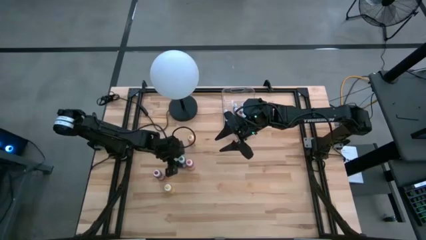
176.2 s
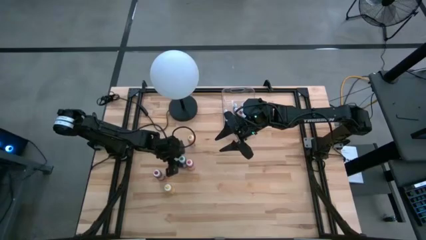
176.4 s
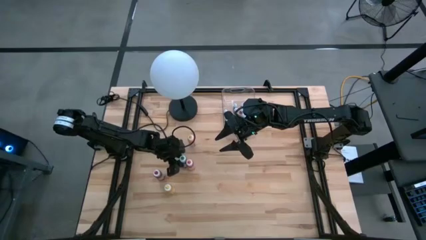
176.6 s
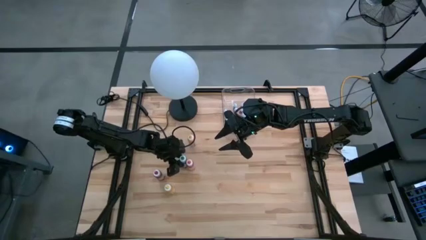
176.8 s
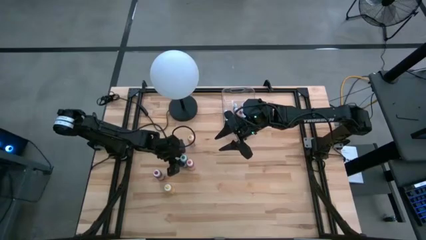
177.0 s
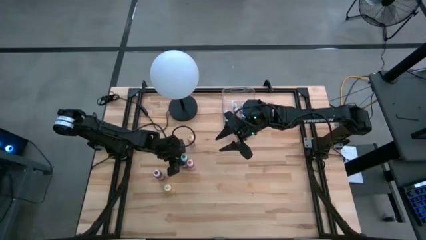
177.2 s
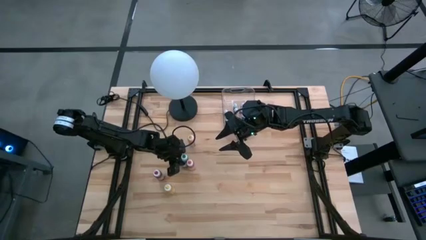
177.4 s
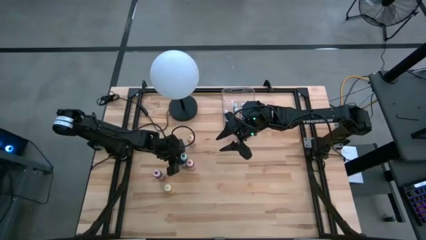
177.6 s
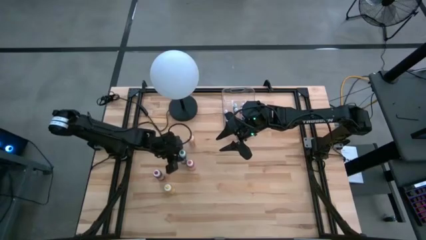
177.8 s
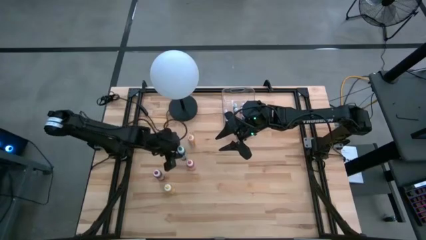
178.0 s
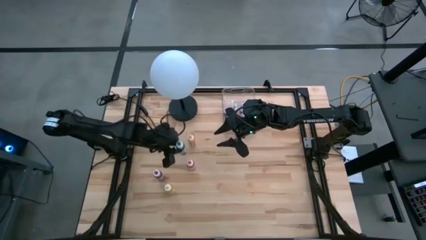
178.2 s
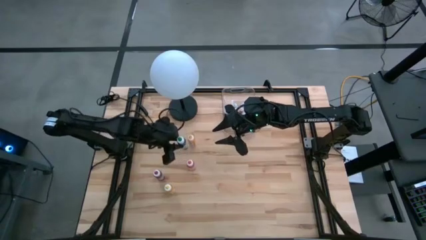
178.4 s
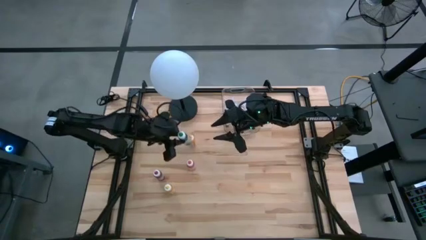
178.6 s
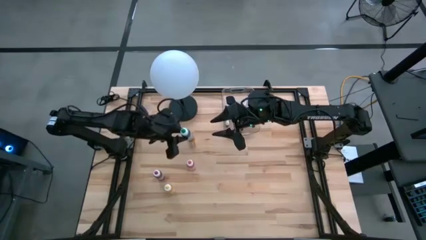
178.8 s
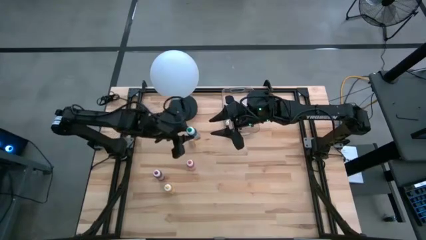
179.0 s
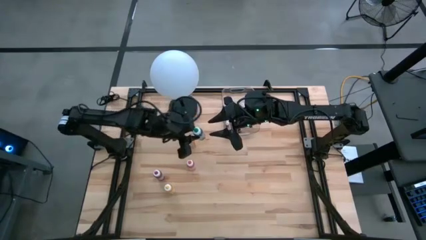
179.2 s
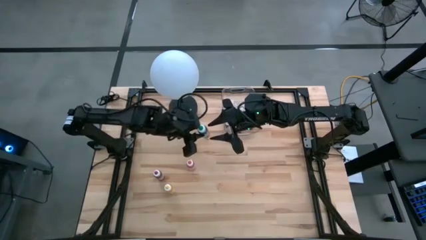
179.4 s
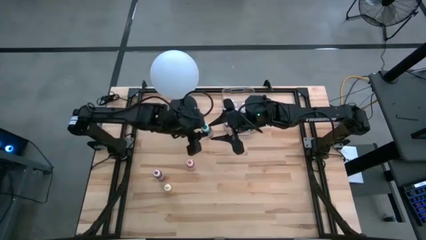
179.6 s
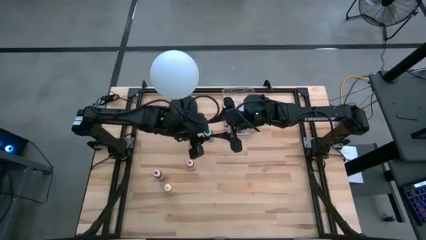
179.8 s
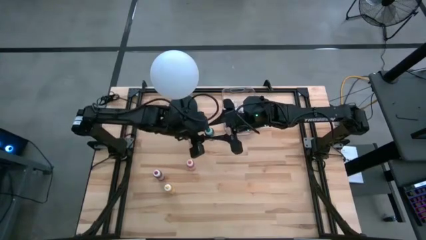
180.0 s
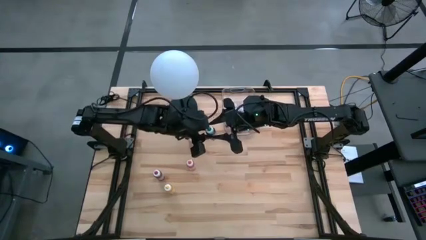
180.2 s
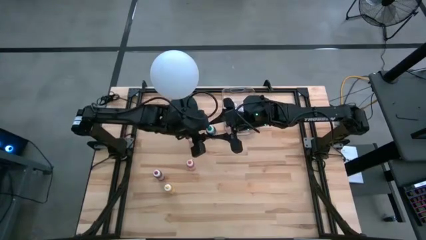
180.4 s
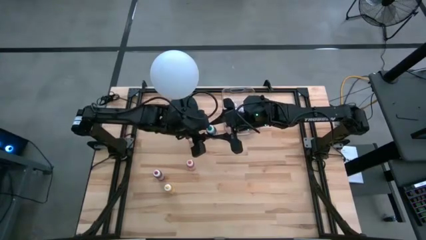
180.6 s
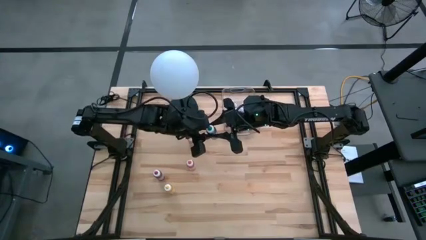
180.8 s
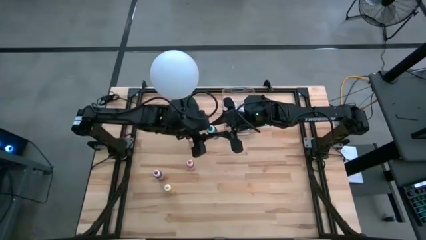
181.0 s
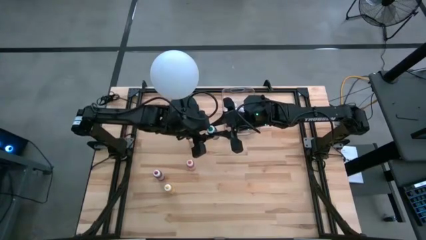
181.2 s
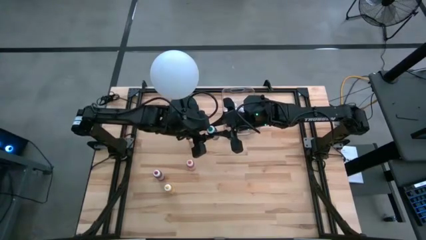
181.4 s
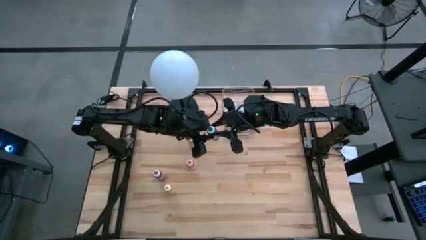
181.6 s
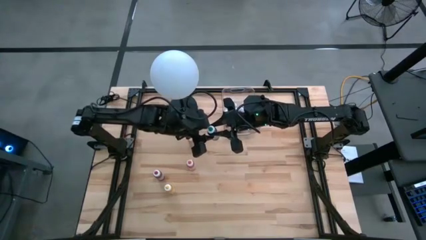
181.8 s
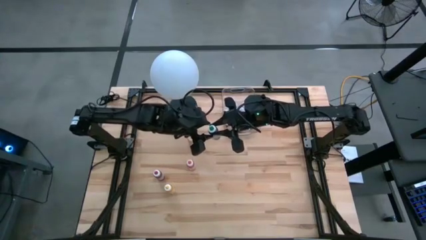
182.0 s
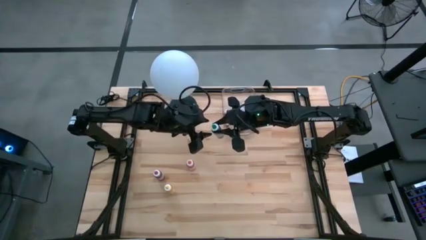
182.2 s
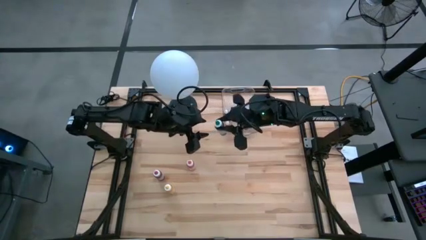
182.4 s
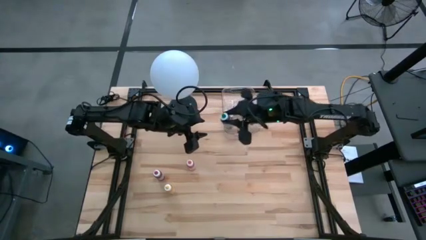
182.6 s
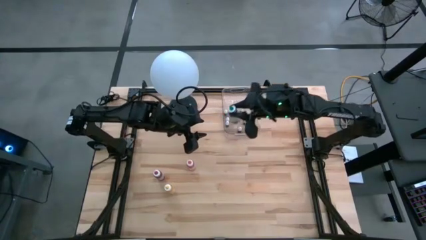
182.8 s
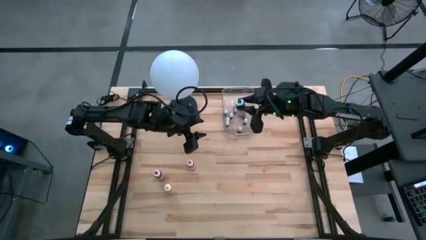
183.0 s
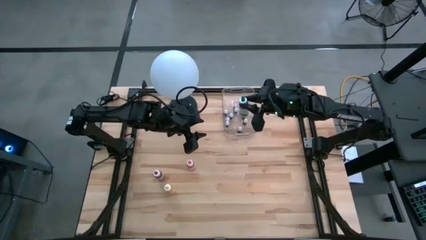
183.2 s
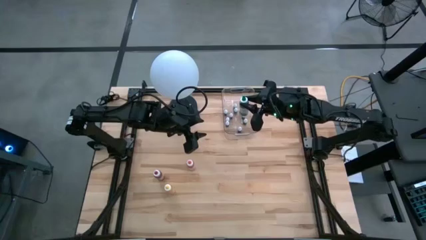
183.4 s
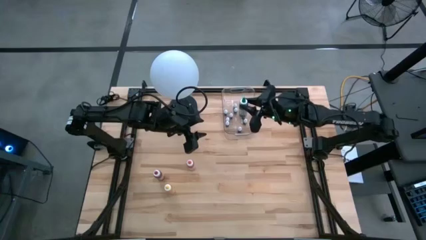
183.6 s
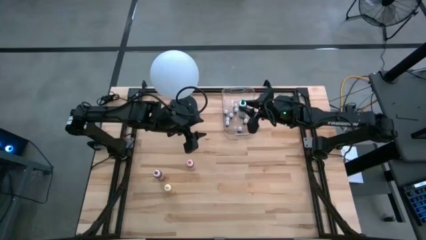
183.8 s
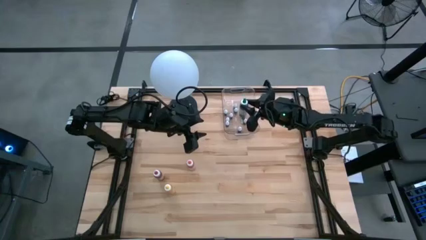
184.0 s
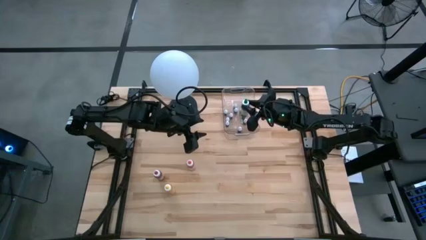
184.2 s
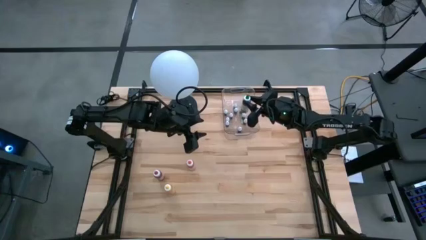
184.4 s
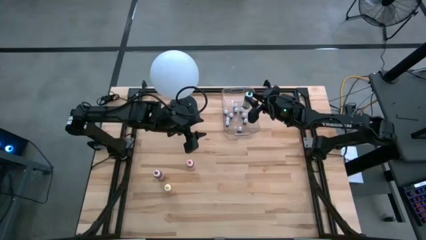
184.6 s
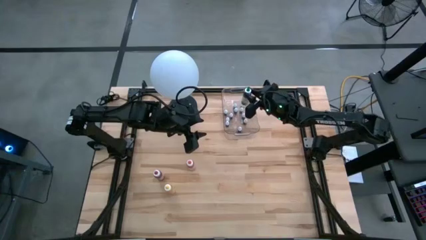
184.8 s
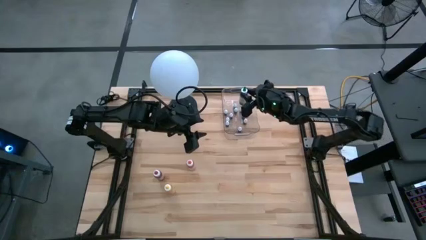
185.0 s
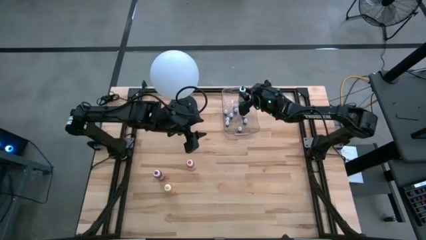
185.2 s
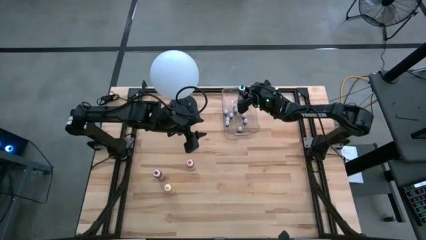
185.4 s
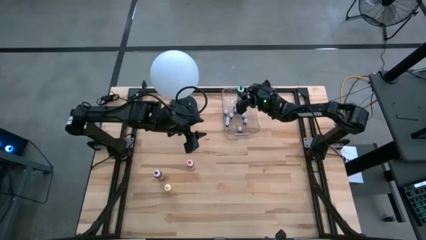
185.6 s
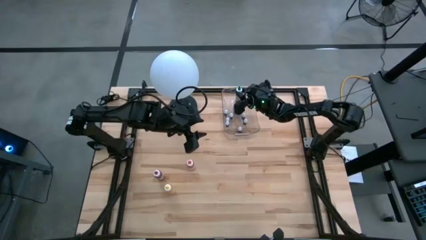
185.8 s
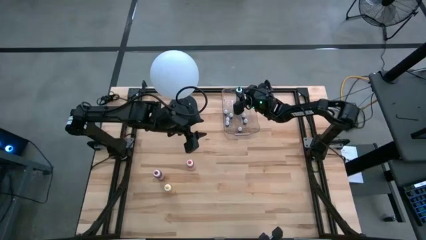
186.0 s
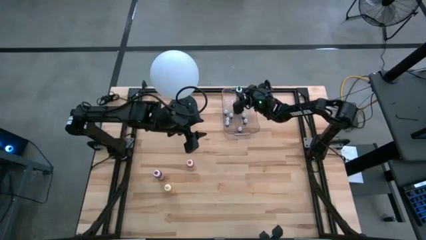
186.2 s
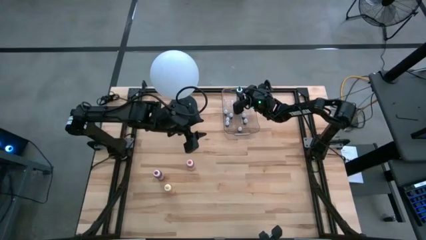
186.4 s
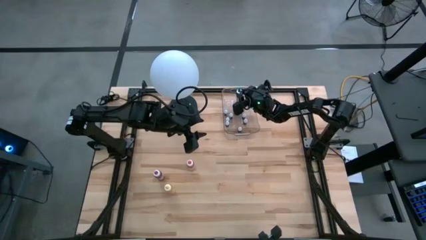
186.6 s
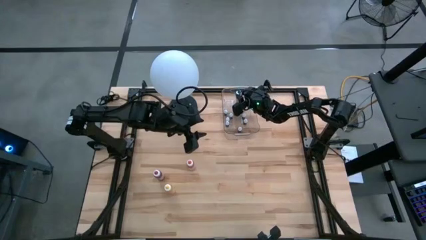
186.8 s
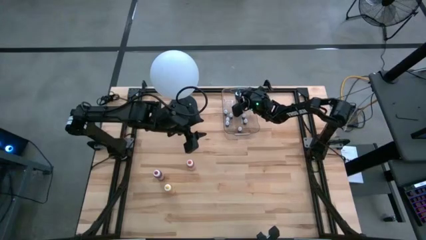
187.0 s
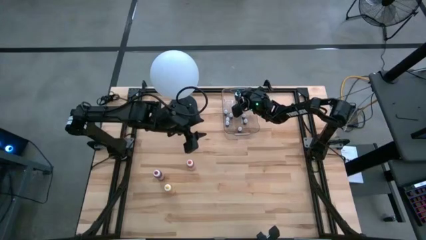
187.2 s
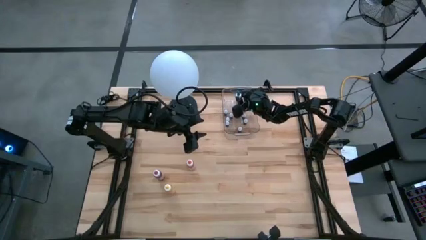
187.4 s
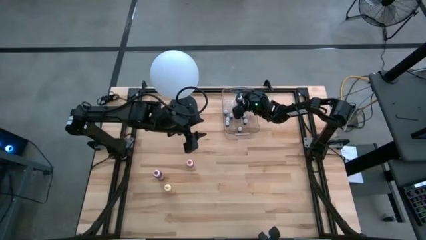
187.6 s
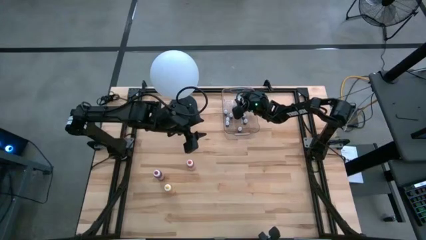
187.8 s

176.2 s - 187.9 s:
Task: Pick & Place food coloring
Put the large green food coloring bottle into the transparent bin

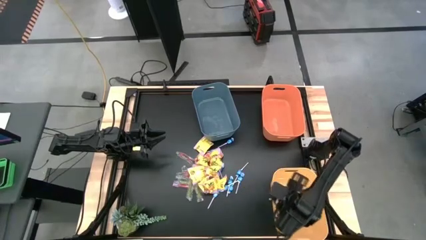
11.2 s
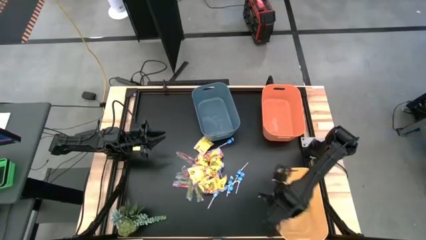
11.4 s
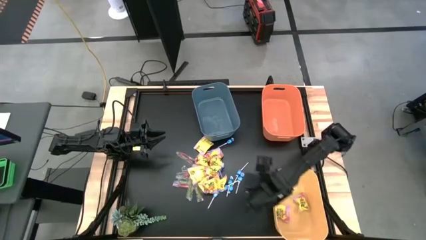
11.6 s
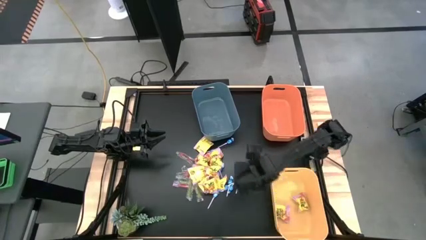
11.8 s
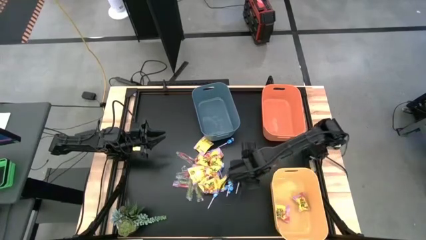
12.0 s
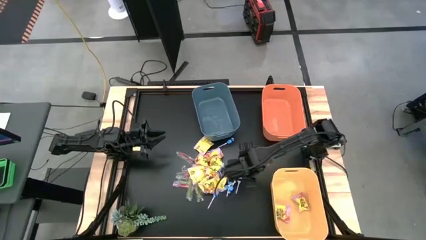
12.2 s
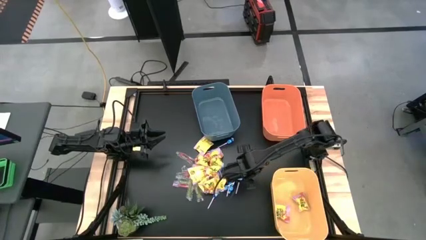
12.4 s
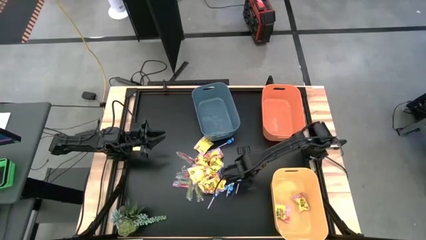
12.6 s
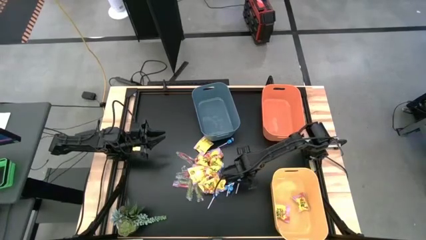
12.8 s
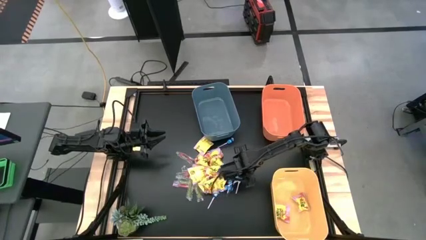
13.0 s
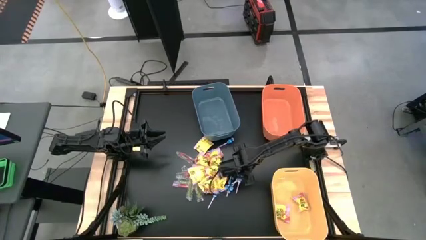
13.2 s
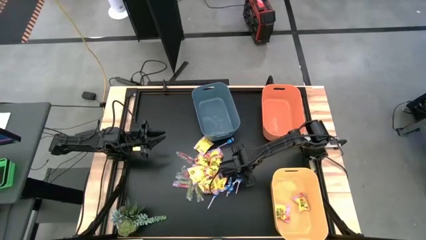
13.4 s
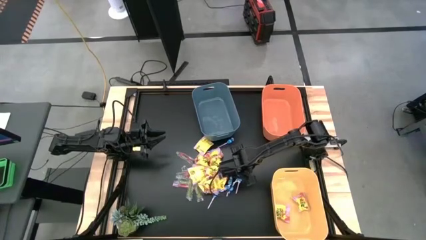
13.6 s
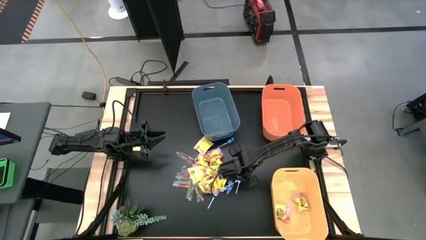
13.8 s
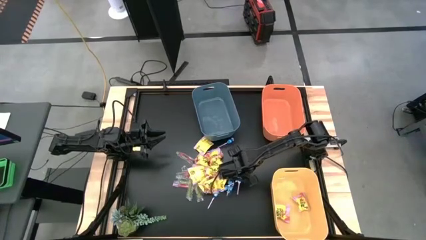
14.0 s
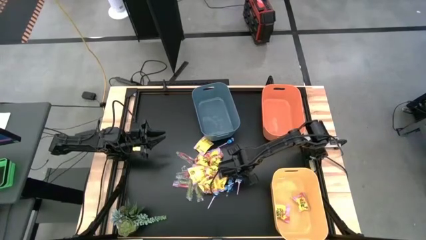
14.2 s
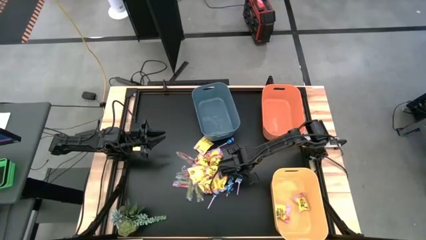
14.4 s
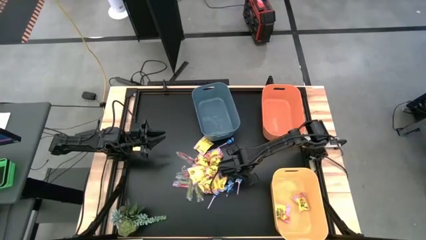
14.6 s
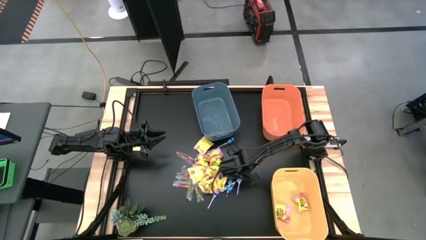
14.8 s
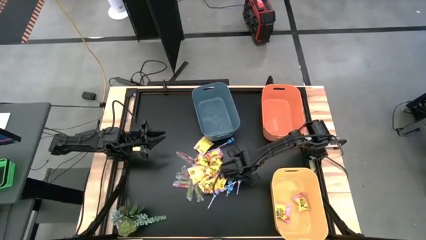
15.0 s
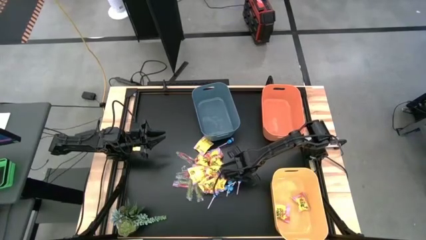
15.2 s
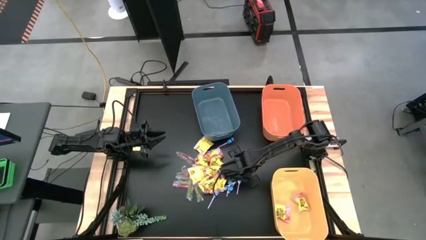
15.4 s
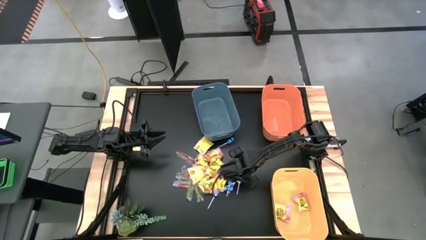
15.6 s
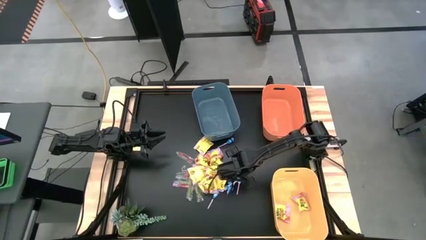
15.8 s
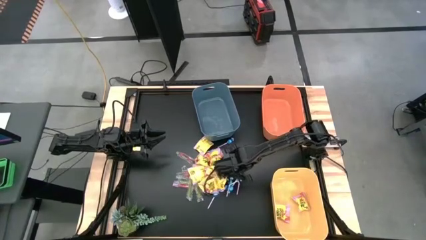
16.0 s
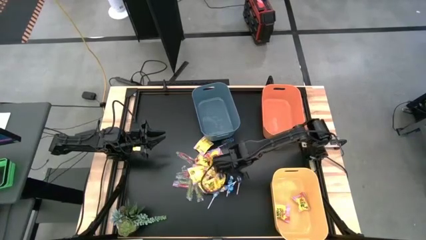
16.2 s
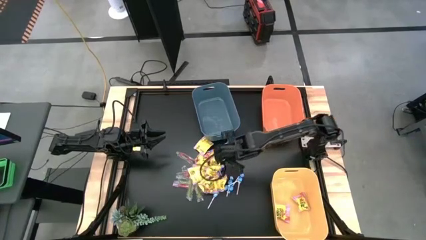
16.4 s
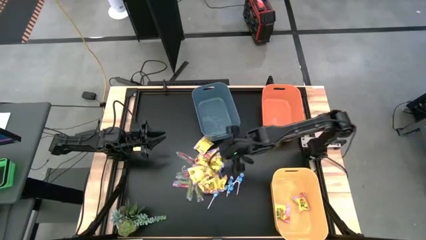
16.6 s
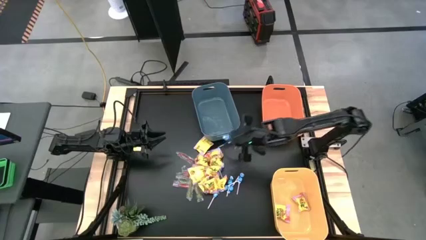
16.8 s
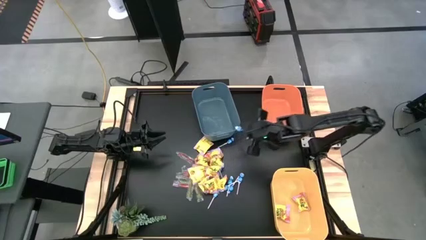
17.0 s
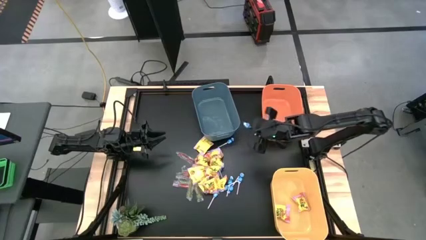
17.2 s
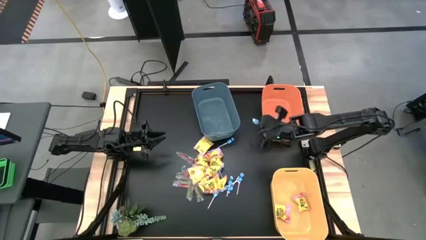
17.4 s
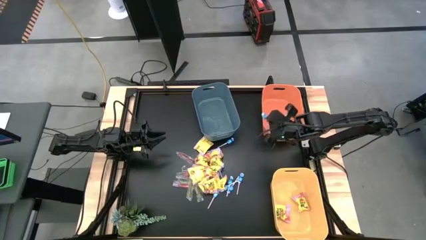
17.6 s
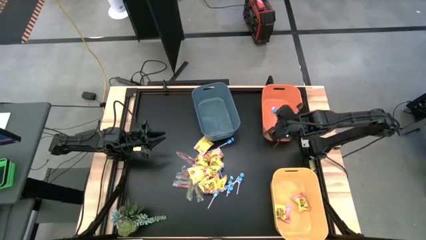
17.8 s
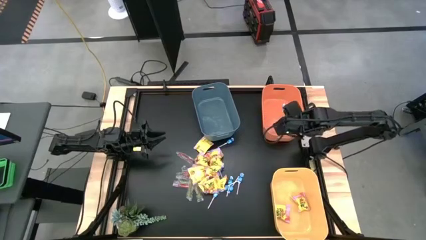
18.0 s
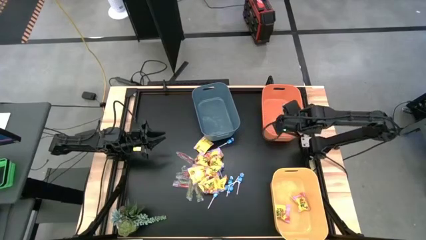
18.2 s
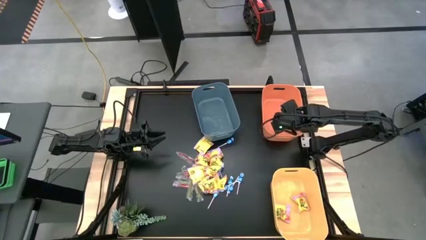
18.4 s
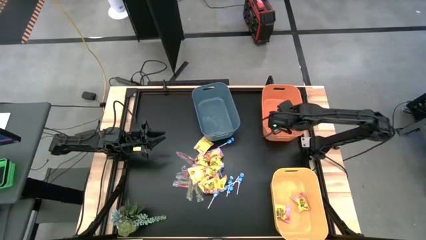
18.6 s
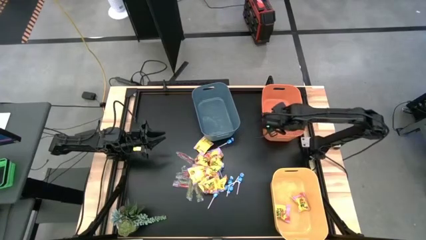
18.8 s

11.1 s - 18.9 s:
Task: Sort candy
Put the blue candy into the orange bin
